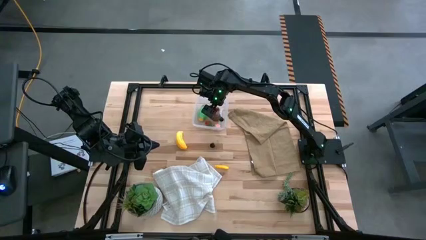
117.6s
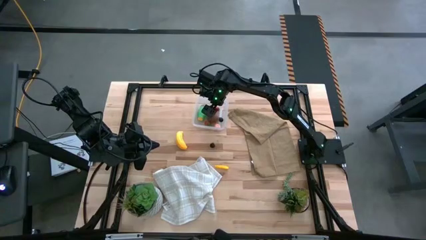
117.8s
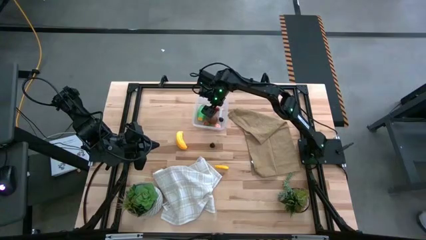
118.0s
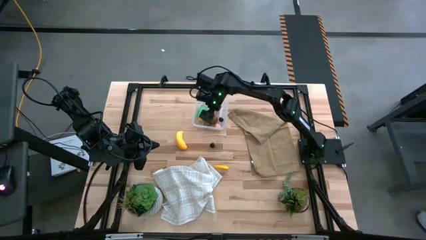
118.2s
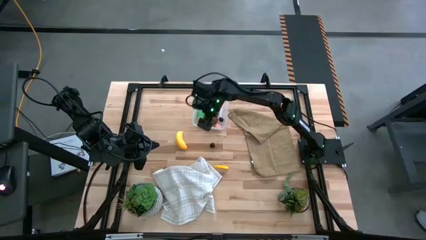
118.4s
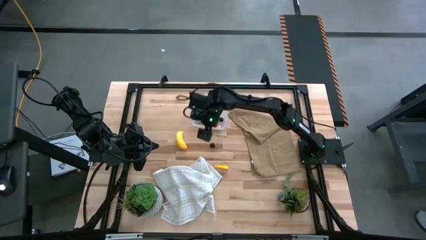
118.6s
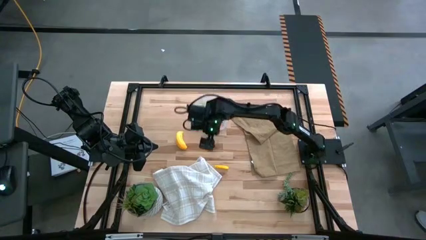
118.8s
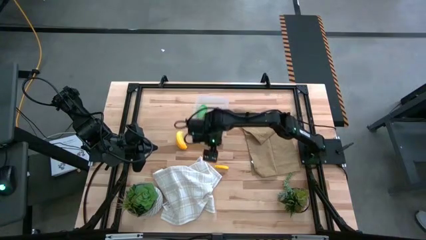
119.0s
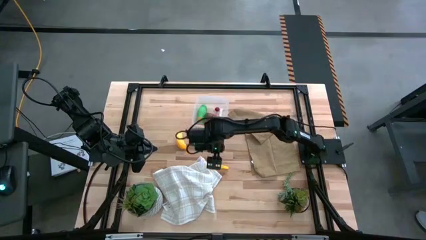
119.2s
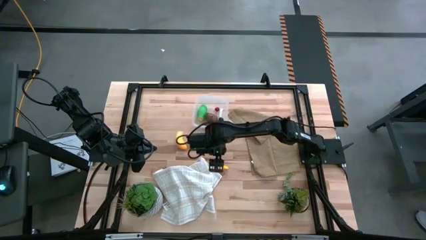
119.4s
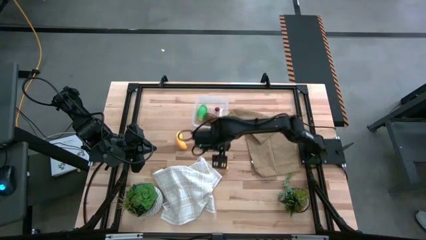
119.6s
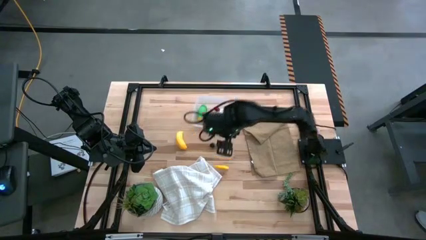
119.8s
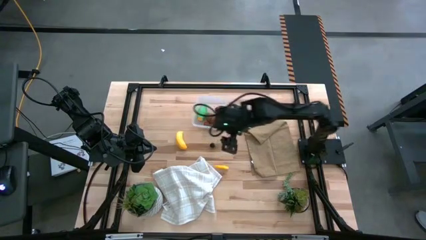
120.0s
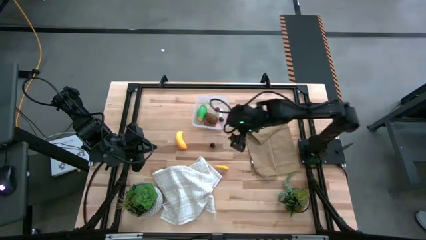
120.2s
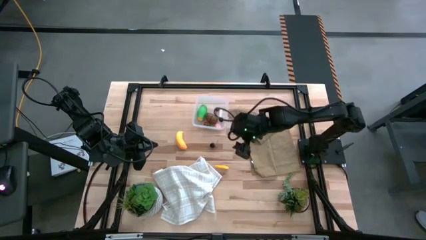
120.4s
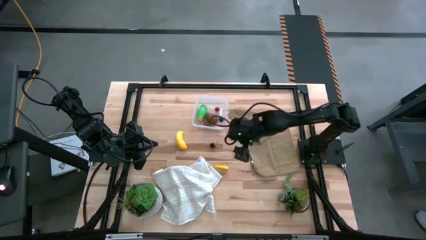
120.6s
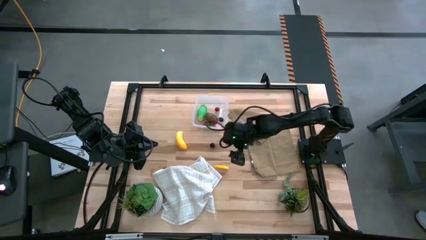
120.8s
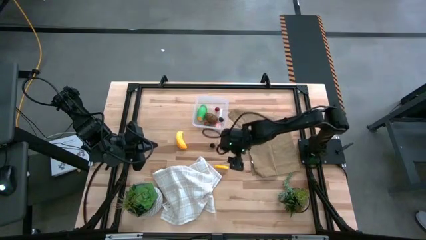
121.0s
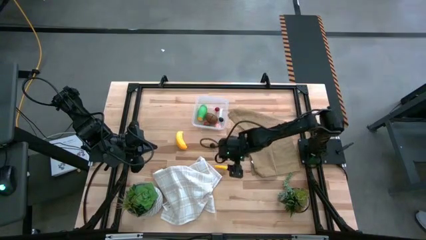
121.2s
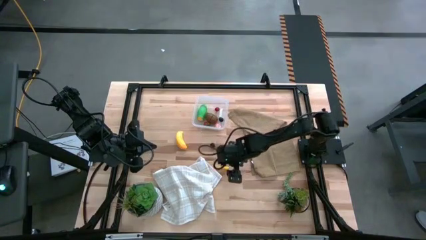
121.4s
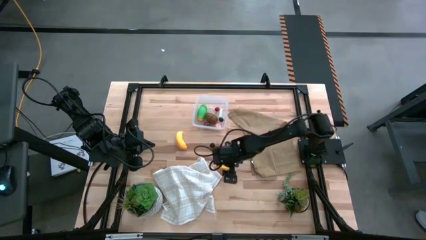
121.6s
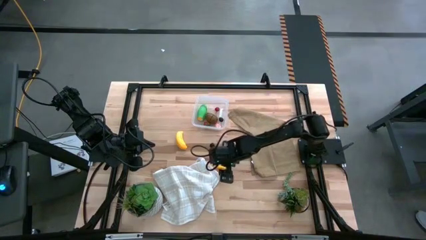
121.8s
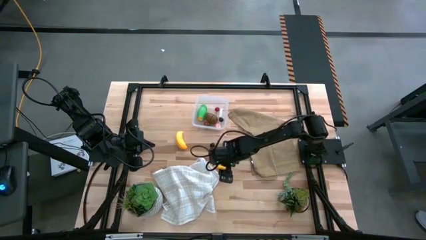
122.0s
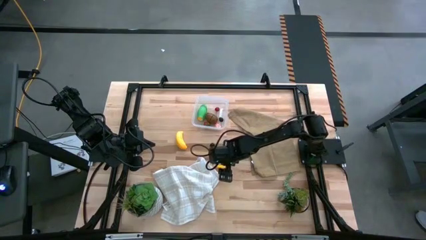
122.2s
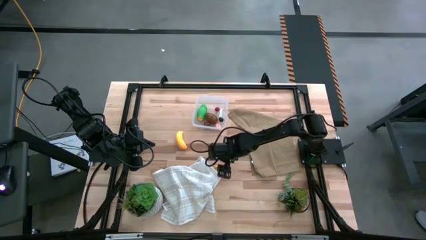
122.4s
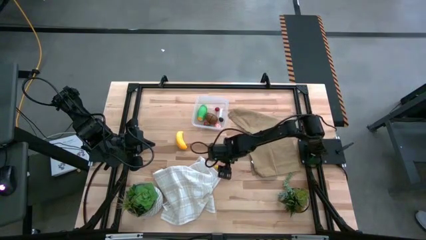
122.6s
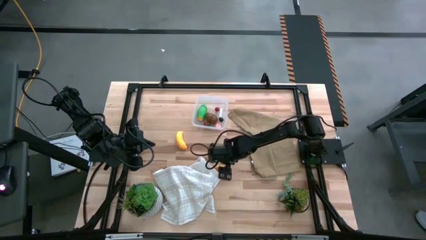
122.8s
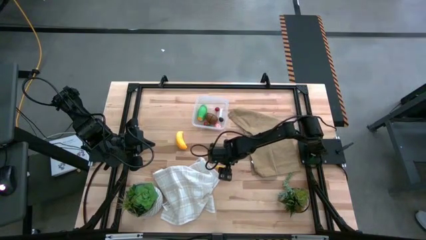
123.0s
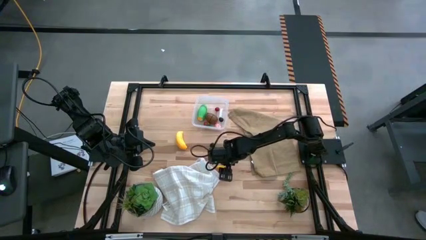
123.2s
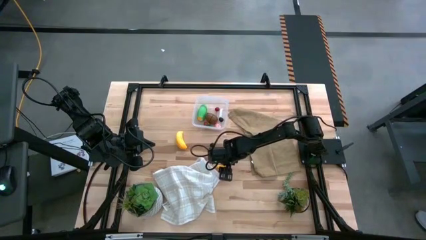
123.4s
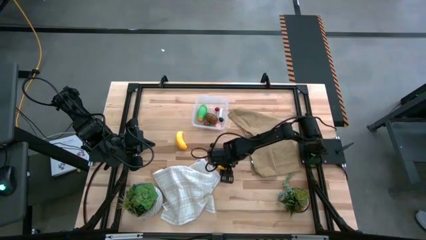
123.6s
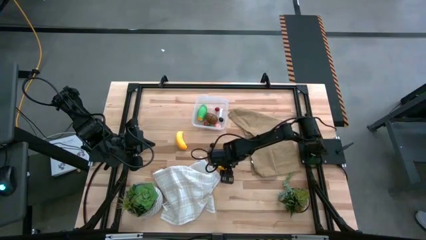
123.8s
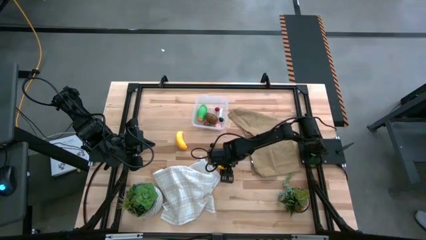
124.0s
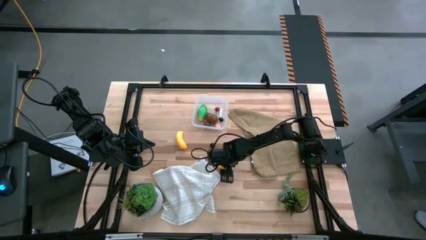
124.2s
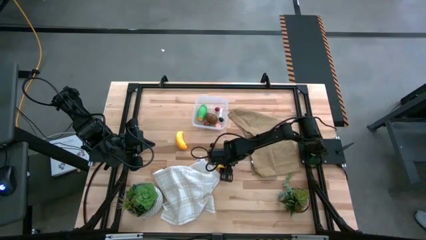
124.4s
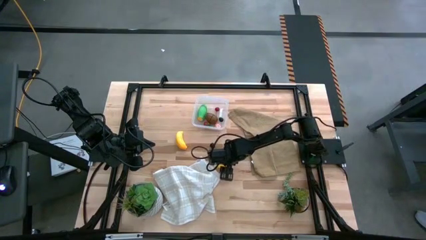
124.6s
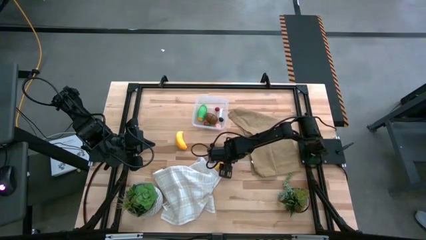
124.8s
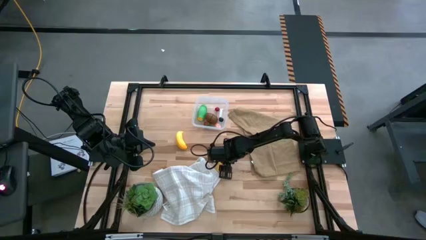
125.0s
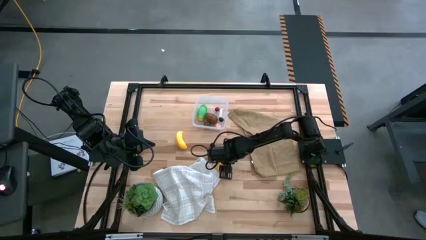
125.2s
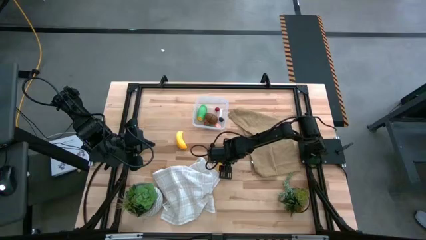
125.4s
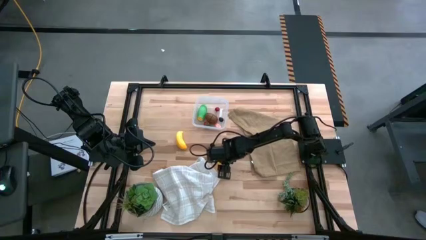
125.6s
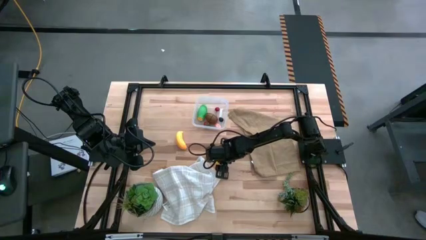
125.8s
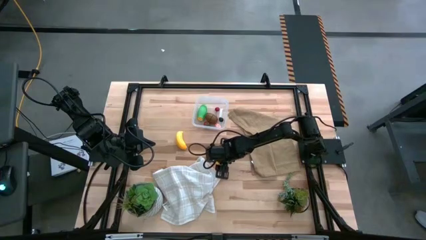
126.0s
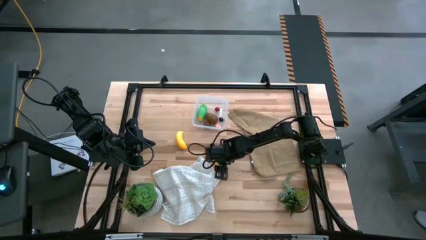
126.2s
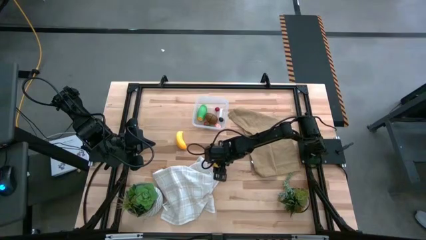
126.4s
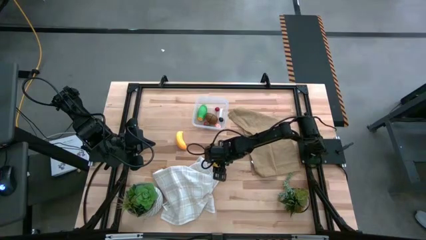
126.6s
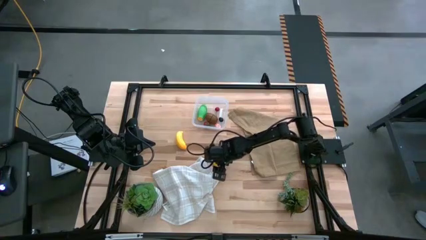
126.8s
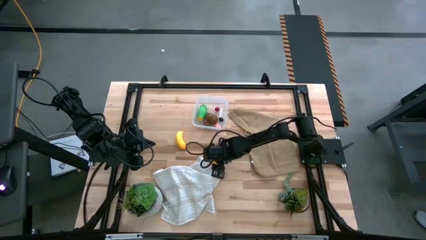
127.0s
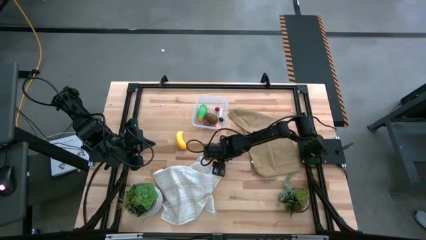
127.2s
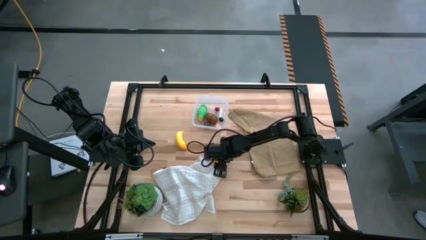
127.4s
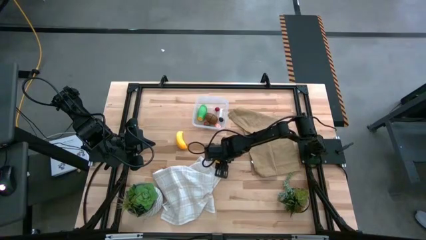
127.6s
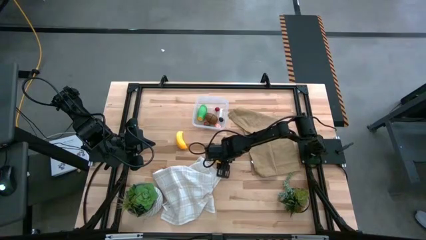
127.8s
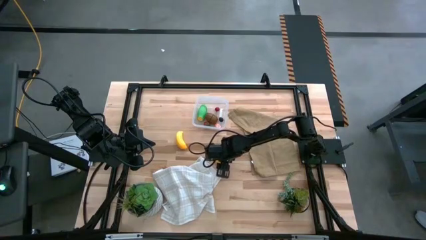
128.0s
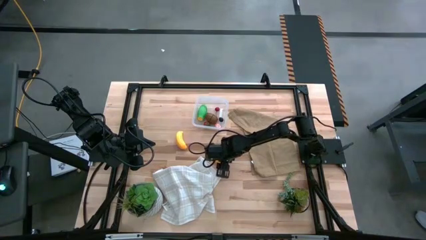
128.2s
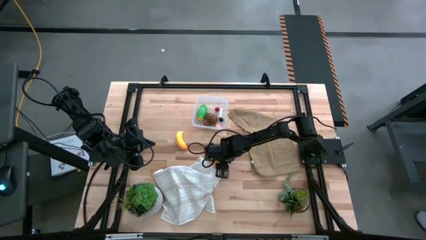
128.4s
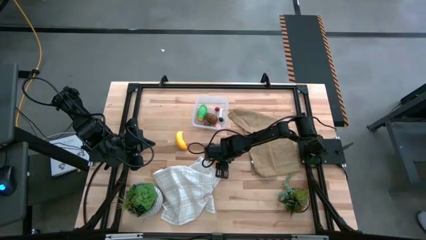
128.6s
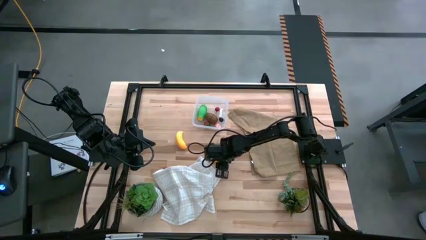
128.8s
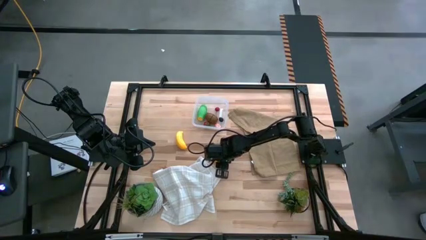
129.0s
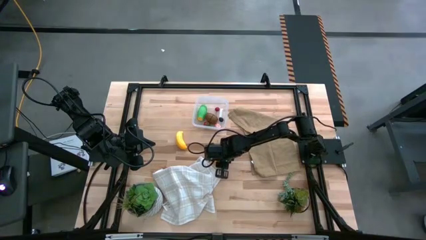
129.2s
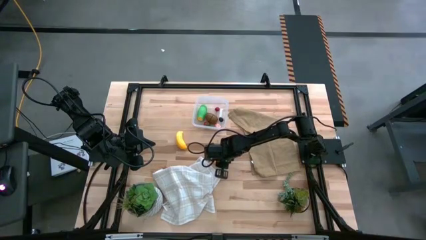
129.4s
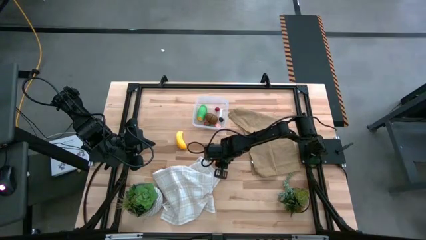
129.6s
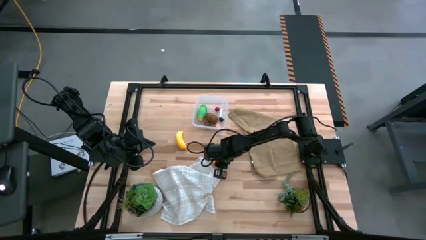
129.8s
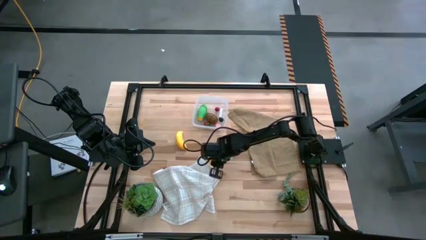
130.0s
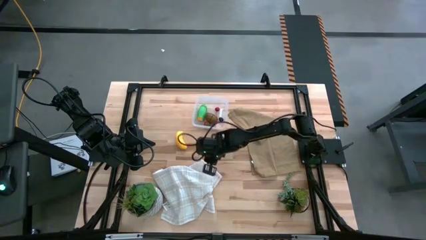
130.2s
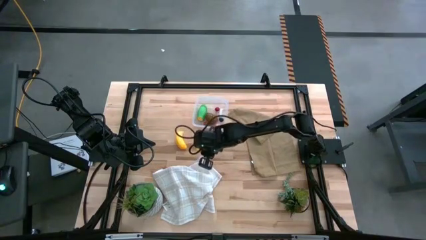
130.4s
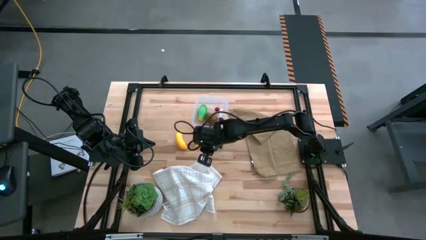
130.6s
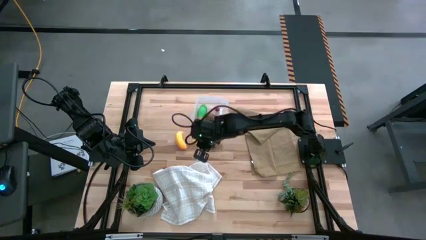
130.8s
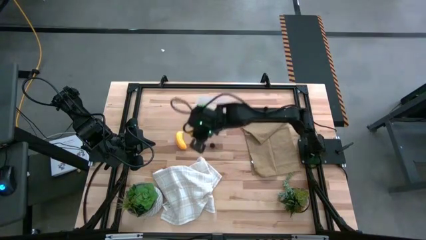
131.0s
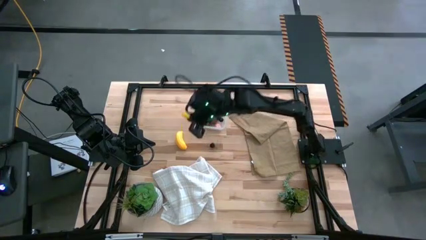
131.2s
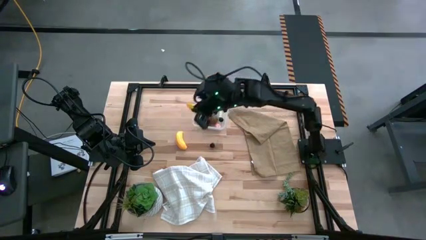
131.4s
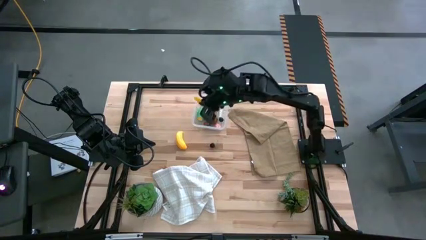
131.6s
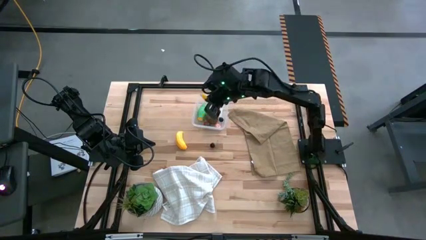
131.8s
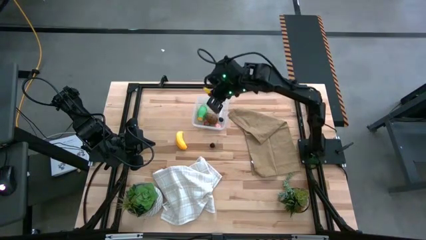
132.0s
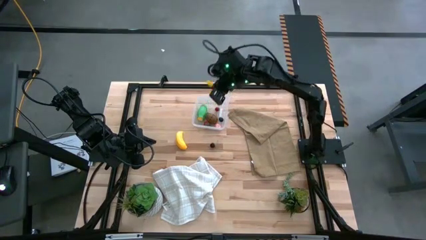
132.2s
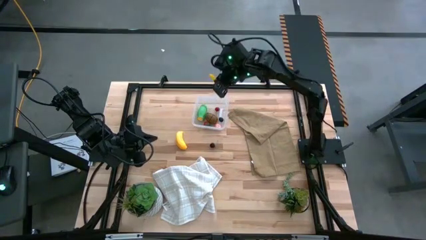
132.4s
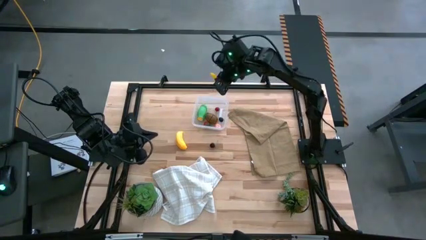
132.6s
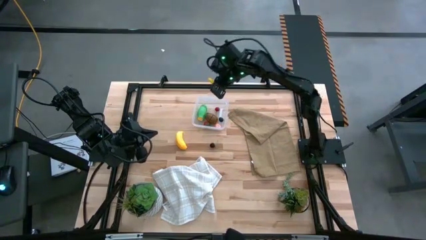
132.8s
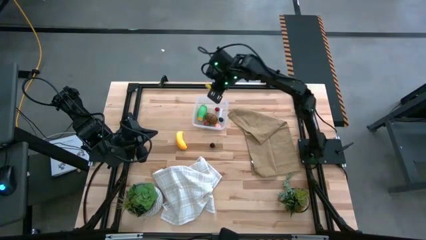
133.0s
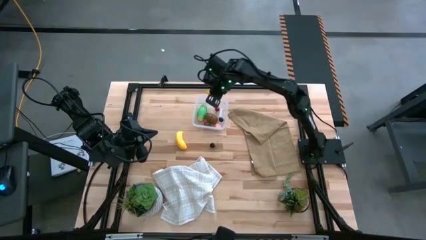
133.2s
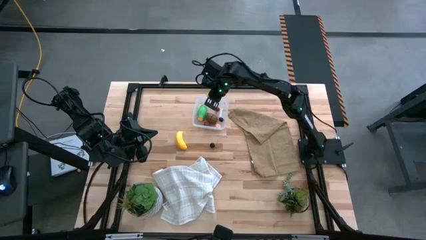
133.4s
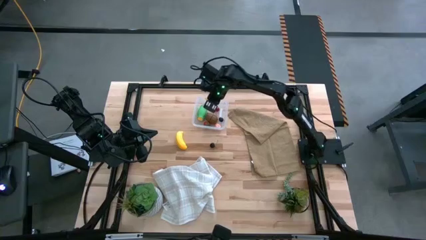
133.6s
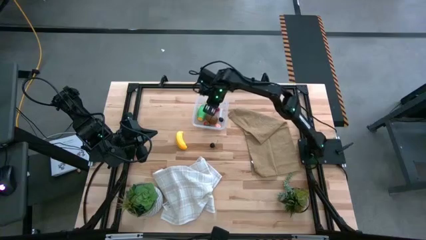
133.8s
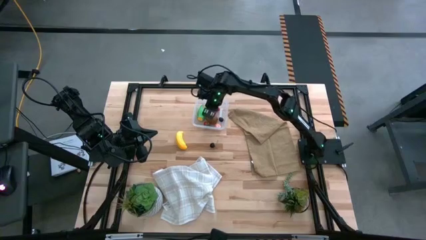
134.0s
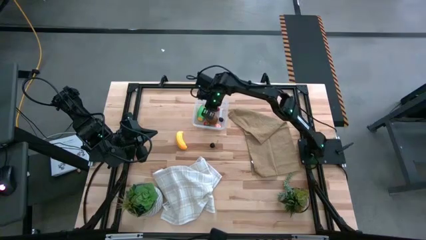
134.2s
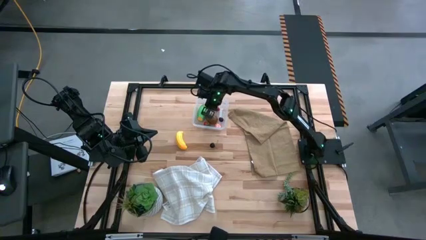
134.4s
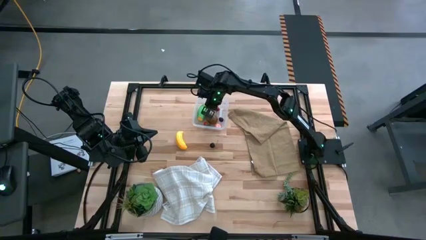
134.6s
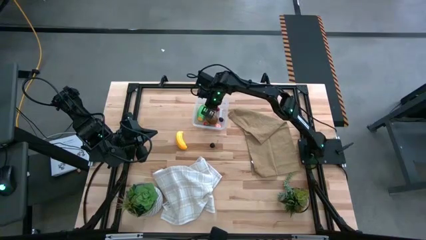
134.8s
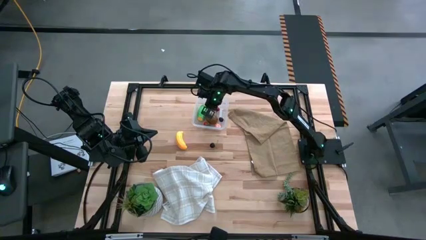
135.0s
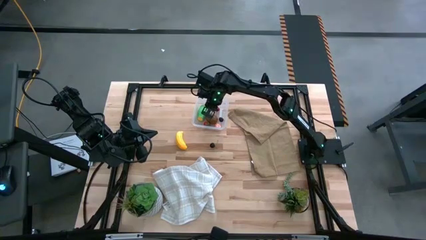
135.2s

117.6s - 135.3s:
Task: Pick and placing Produce into tupperware
Put the yellow corn into the transparent bin
